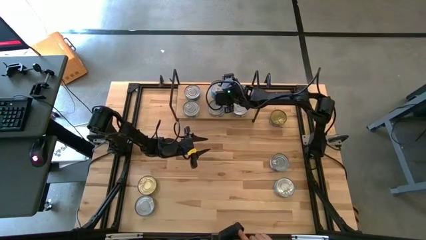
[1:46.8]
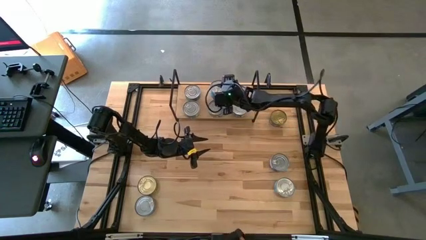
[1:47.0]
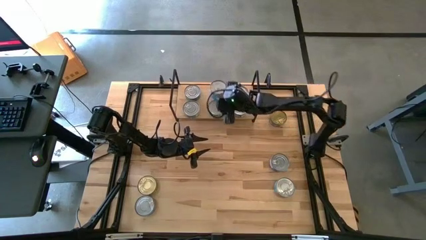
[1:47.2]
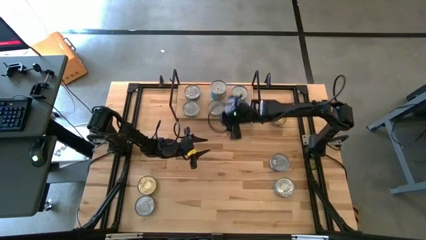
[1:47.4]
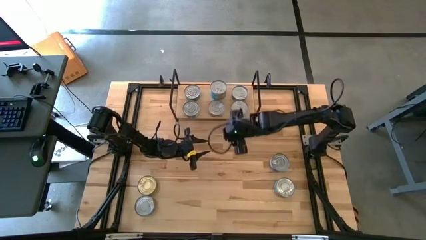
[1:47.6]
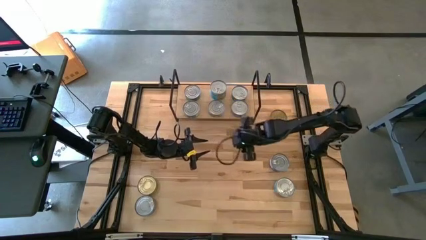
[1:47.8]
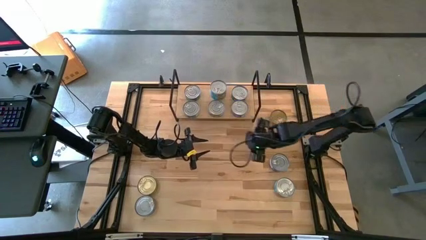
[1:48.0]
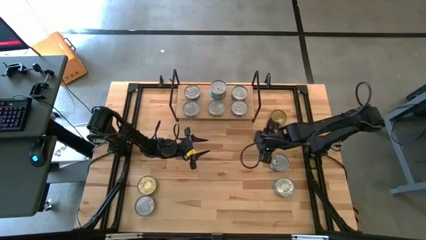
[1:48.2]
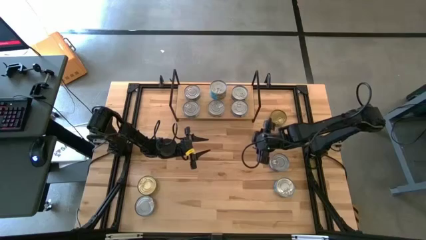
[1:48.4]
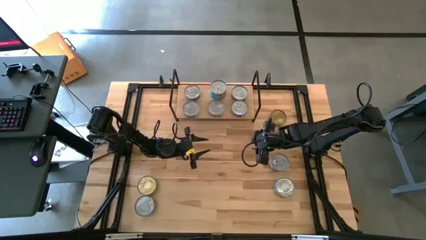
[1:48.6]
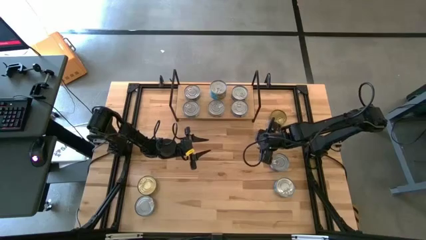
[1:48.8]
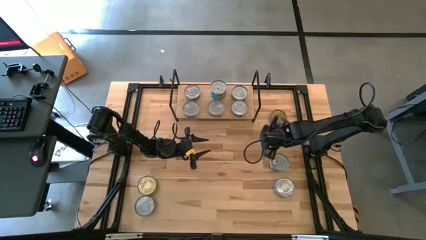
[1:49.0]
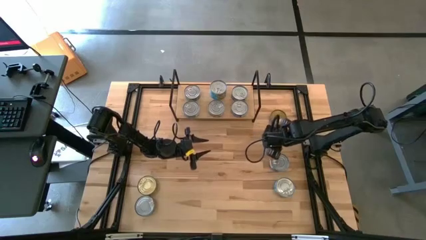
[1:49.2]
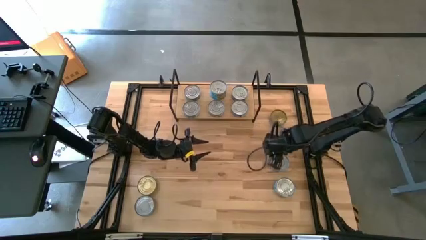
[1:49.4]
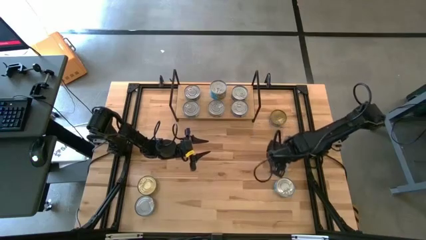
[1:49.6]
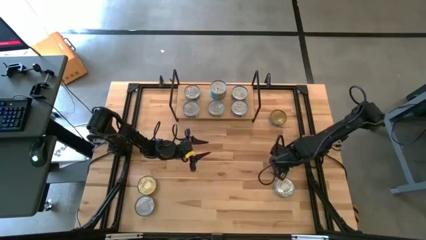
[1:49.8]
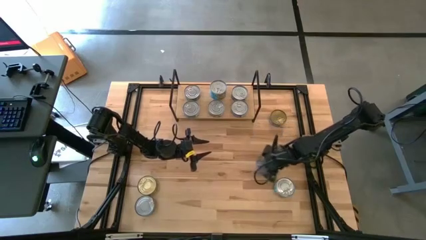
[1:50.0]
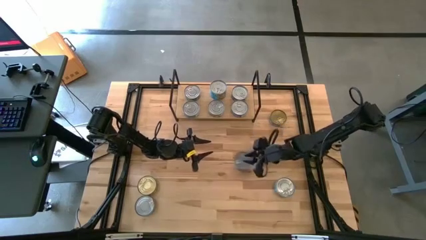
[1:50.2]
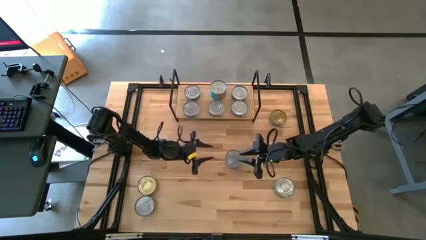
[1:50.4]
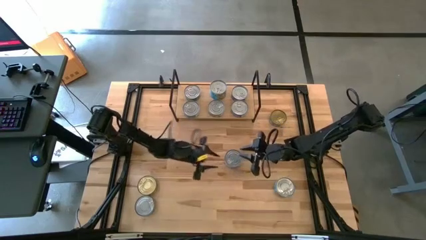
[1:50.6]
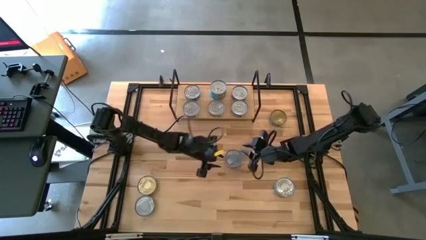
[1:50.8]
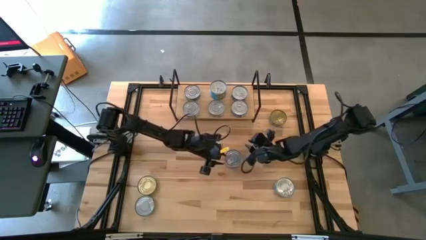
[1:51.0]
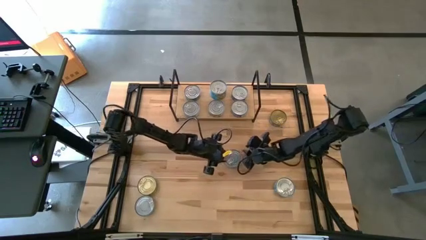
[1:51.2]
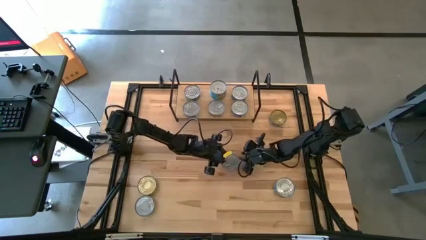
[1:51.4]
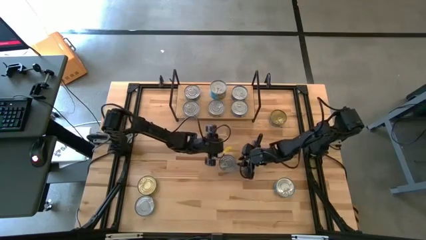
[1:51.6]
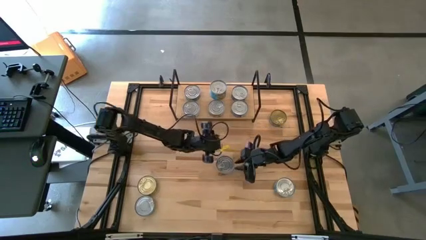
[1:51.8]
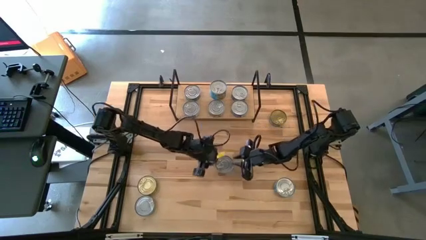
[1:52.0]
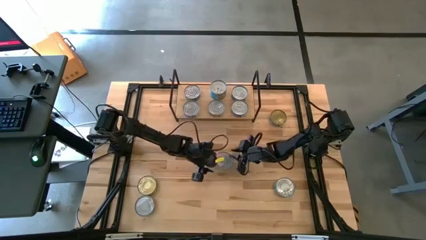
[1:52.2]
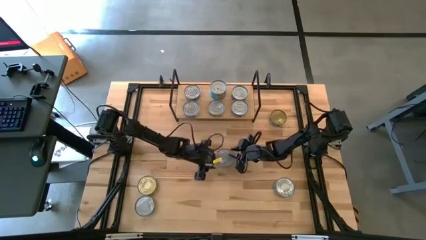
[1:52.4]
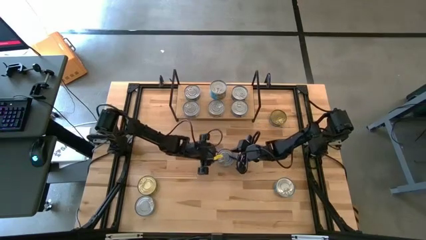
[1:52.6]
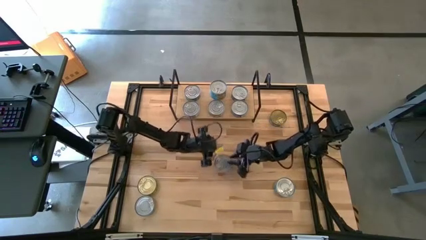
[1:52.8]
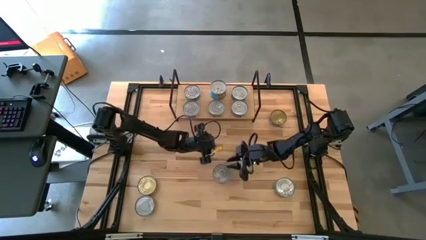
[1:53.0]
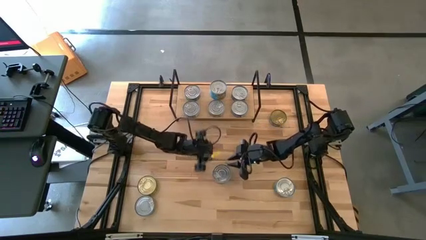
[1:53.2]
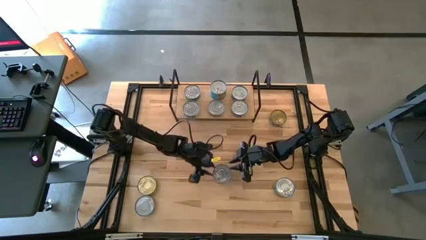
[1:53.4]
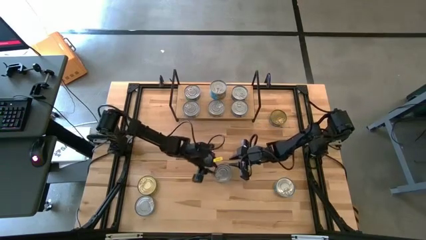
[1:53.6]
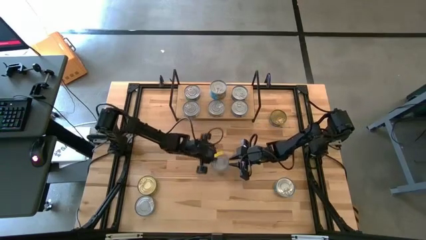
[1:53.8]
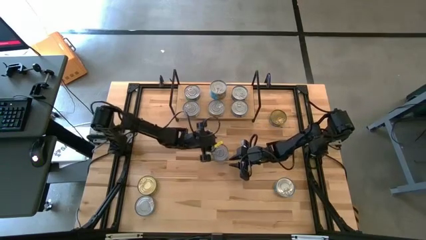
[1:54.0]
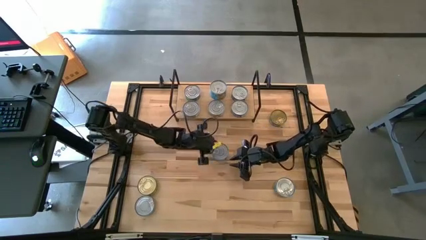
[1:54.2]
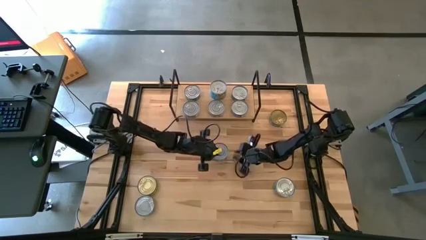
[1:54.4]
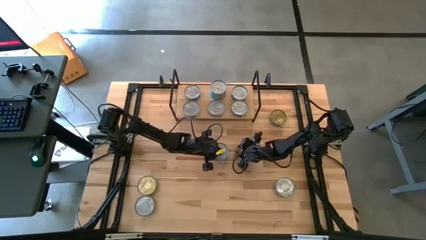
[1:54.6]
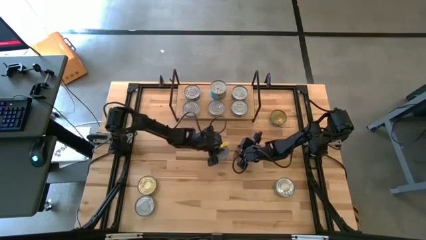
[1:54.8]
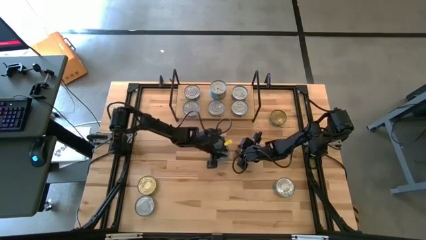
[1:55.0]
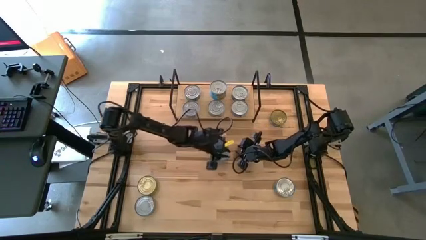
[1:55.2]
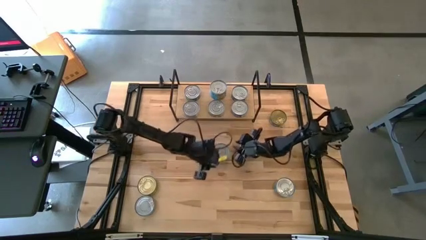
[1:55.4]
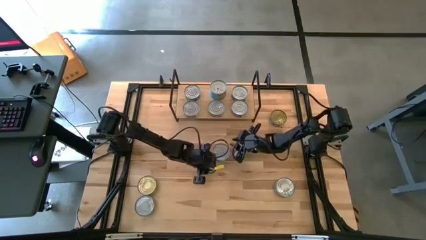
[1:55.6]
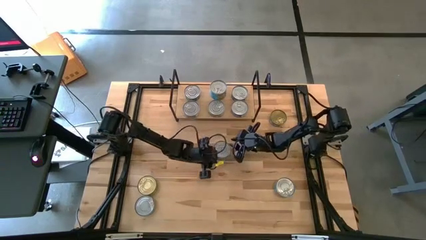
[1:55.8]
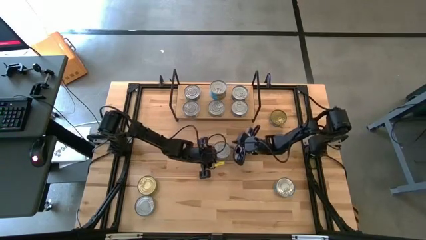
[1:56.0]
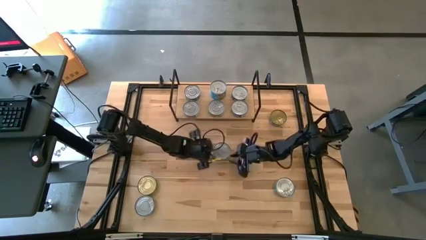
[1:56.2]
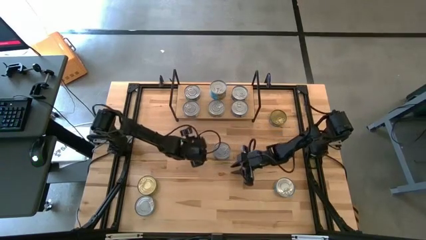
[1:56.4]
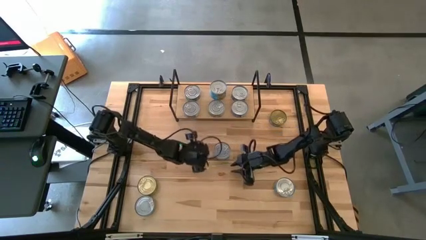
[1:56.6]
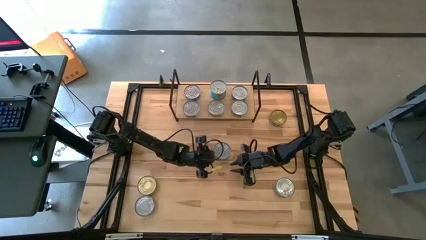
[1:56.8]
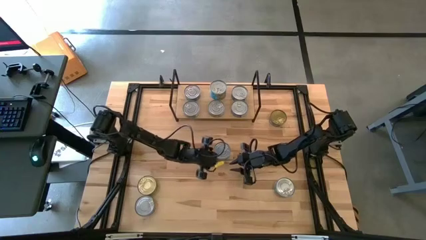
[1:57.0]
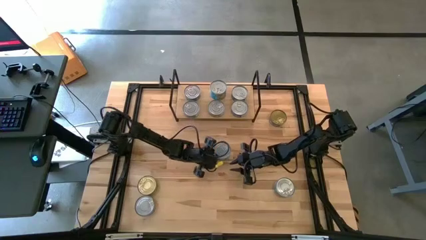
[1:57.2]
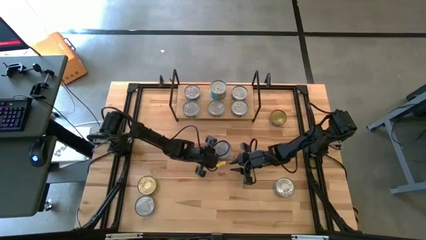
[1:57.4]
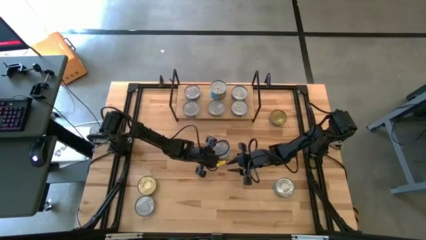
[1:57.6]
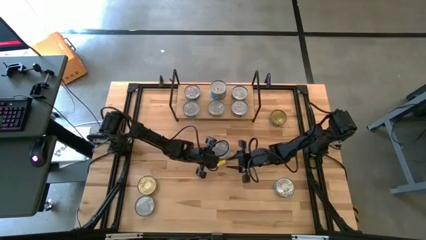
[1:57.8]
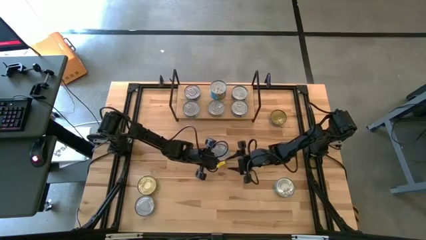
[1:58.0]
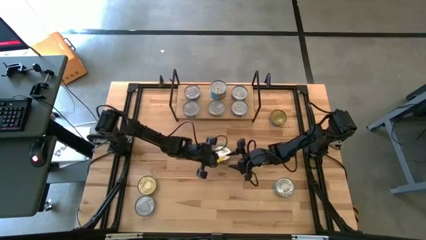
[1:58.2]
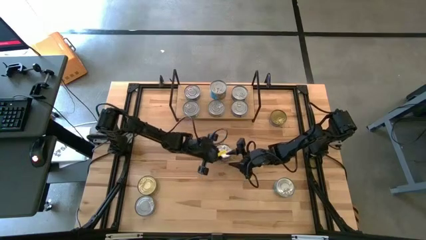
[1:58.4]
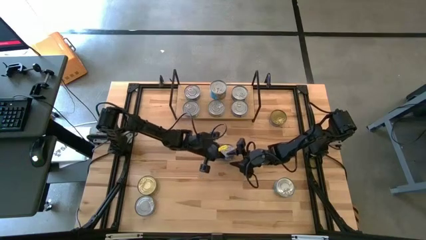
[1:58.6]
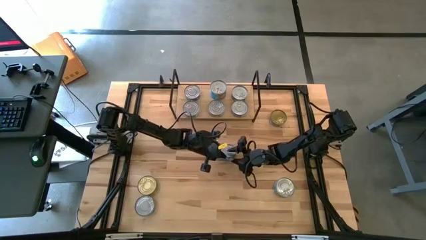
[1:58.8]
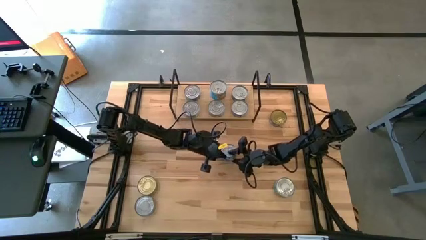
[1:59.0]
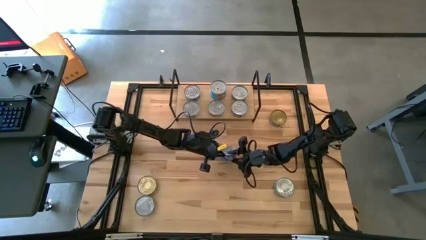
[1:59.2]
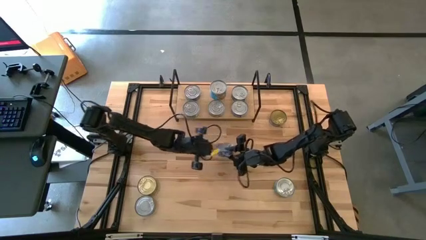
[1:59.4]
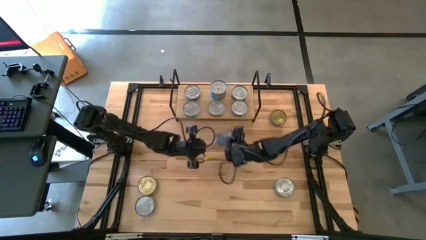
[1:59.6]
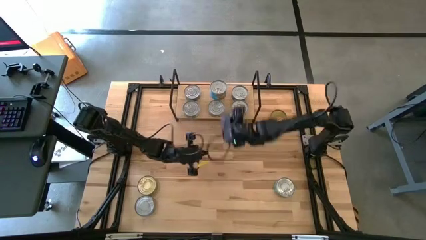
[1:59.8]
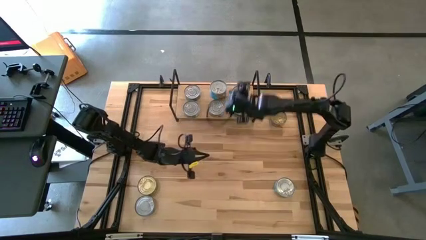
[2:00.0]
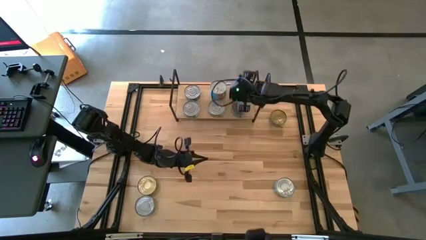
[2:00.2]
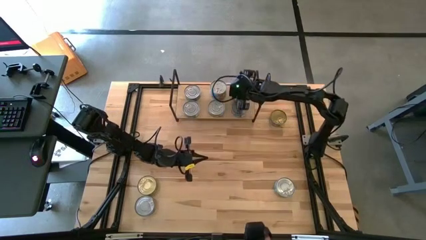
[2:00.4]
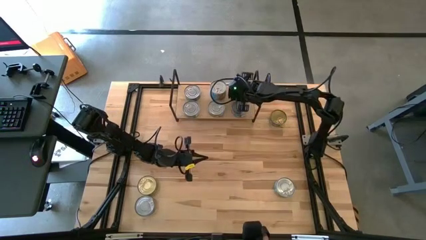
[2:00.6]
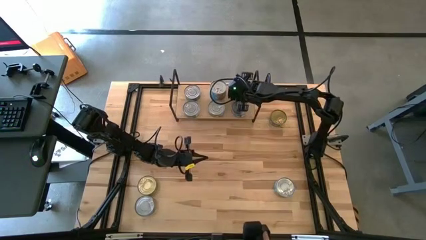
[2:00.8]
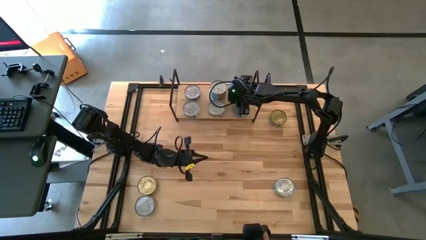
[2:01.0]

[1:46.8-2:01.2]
Task: Stack canned seafood by type on shelf
Stack the blue tuna can on top of the blue tuna can on the shelf

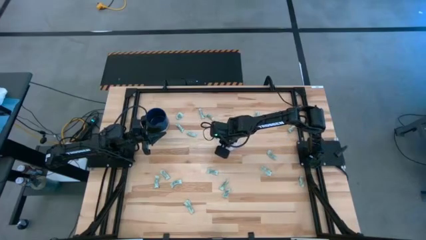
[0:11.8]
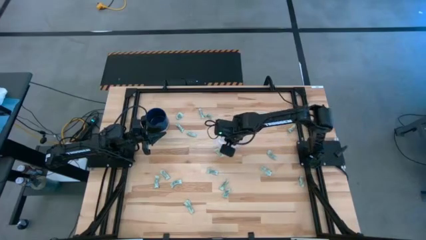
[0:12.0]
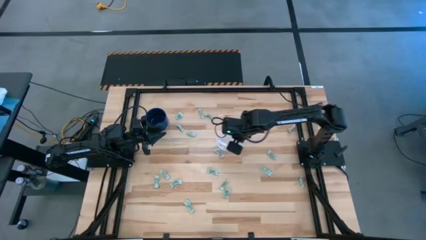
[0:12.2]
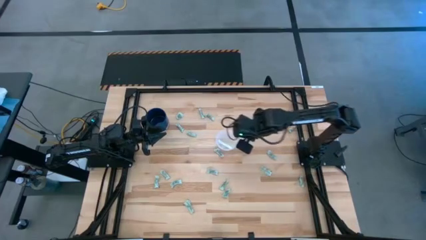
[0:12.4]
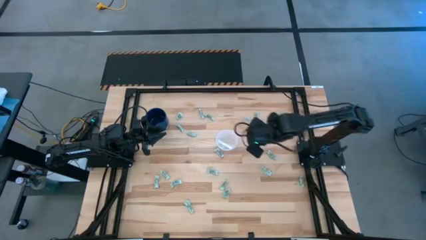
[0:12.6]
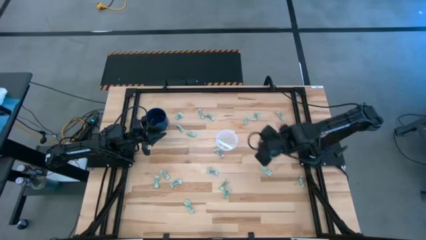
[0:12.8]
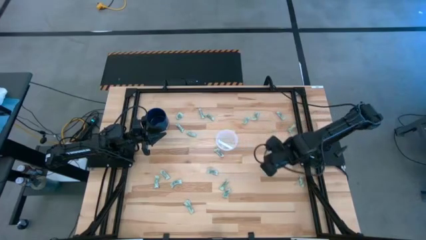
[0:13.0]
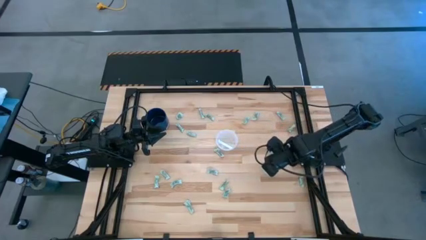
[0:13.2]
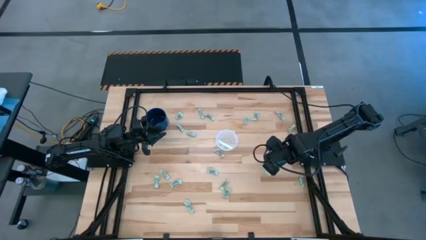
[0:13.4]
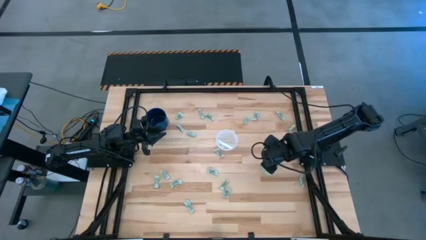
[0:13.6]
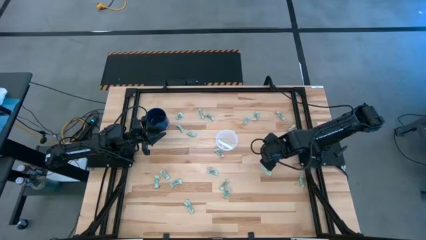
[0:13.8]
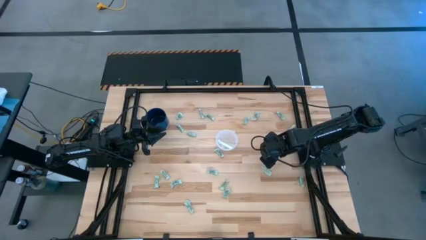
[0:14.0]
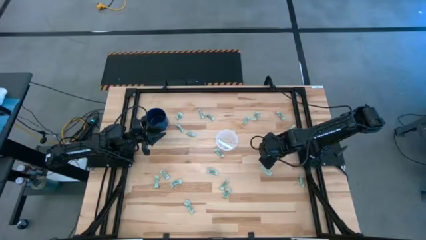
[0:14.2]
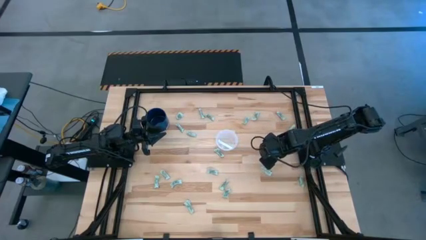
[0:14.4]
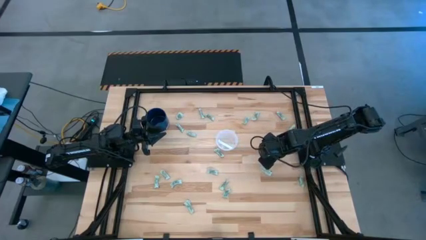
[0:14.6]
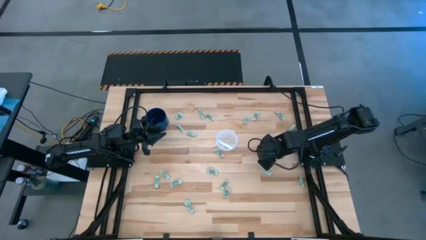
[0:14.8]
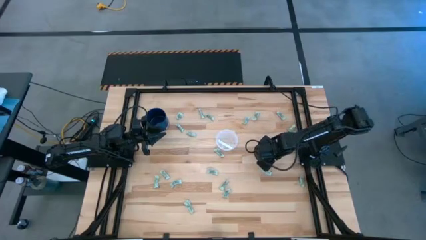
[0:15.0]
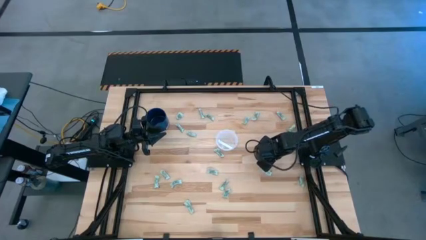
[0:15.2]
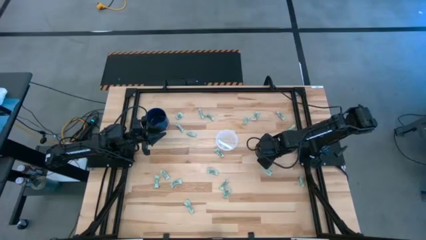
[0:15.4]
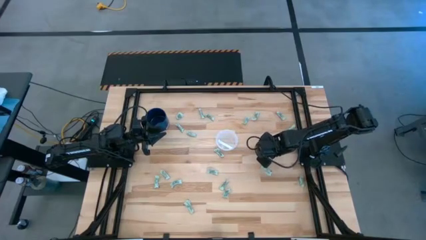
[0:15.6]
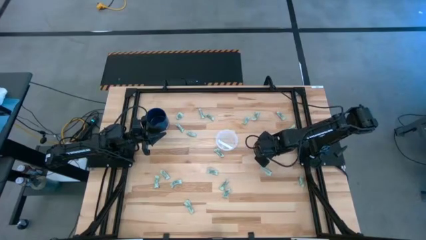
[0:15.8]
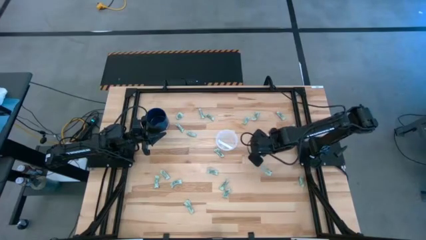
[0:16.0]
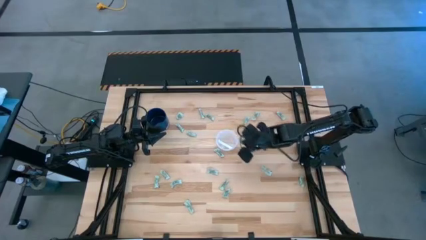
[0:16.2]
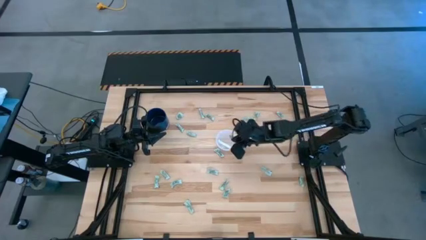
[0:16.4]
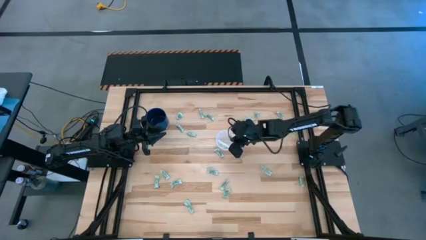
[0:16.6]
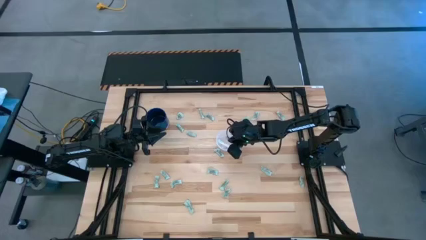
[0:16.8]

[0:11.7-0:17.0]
Task: Pick and place items into bin
Put the gray stevia packet into the transparent bin
